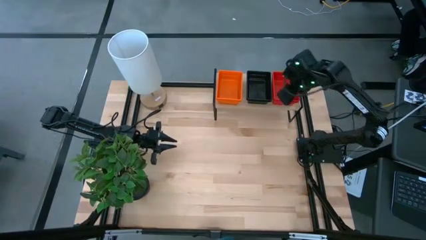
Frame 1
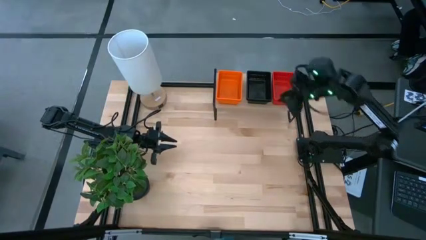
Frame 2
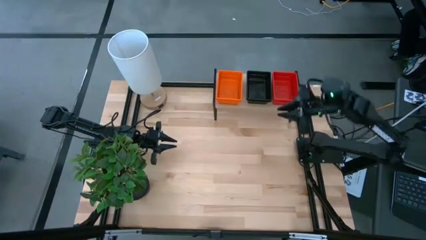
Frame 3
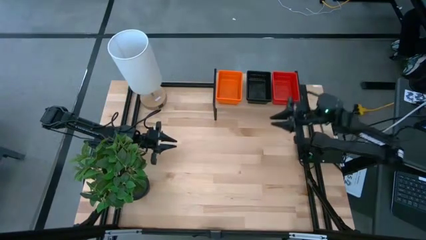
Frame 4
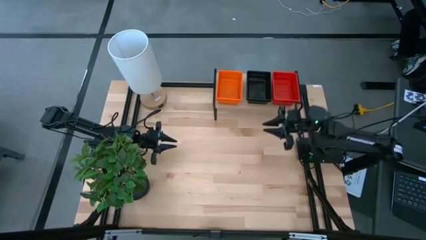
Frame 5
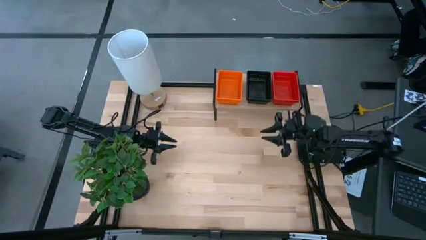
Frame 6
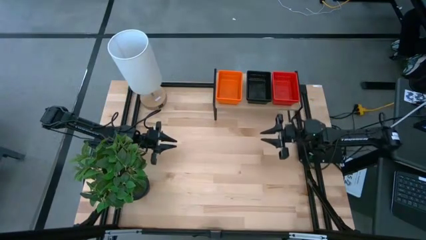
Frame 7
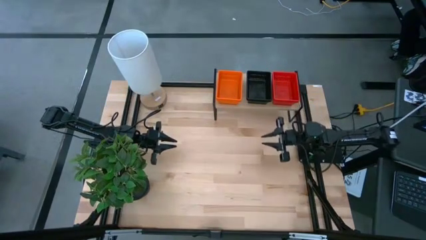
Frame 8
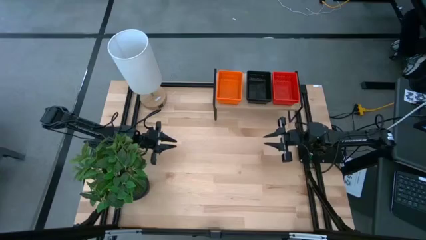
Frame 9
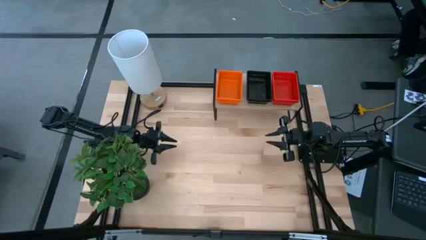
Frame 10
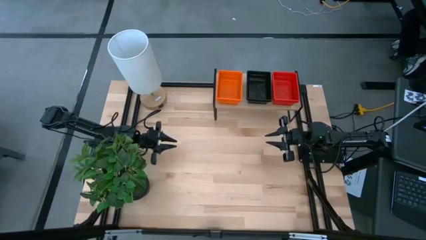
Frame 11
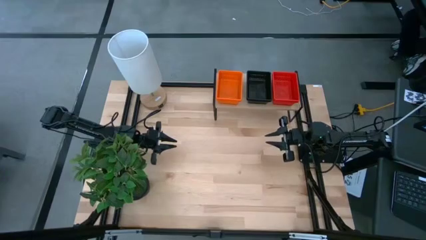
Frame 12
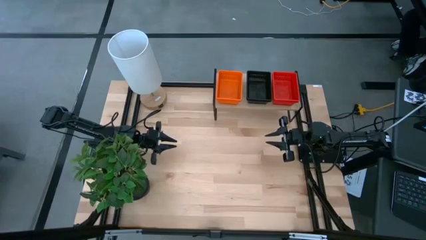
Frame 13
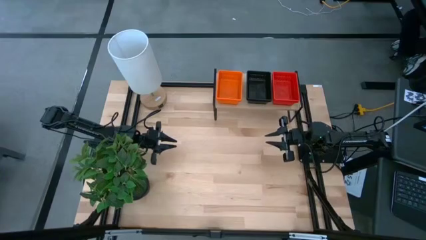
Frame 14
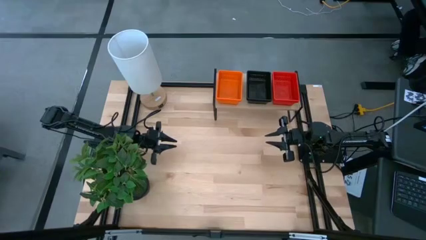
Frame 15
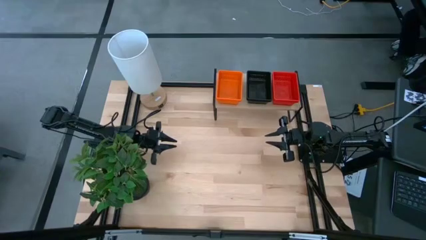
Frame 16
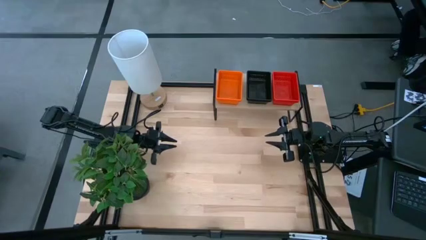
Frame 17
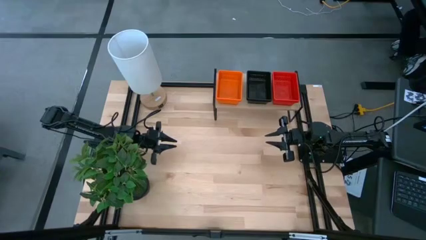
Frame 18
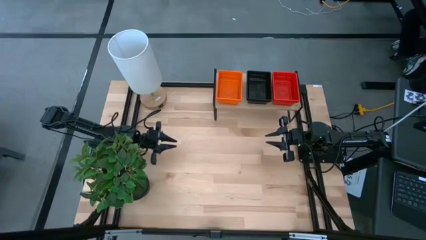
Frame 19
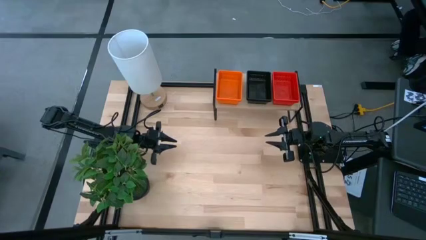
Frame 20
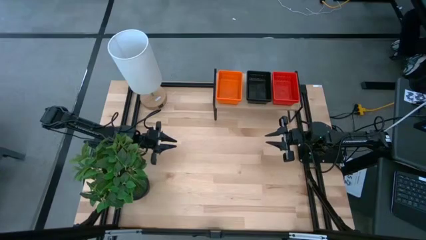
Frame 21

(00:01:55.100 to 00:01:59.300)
Task: Stack baskets on shelf by color
Return to Home Position

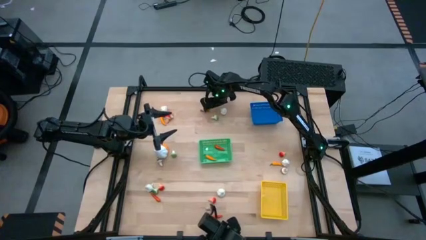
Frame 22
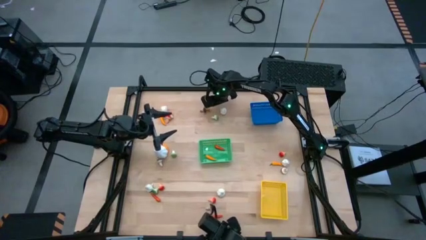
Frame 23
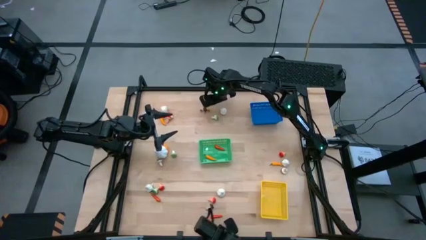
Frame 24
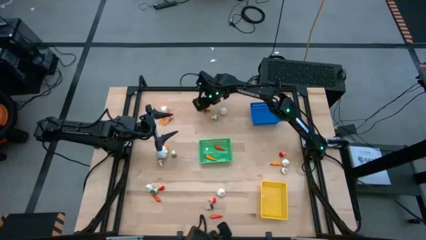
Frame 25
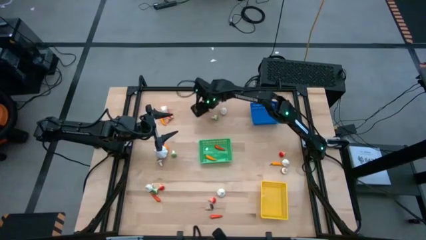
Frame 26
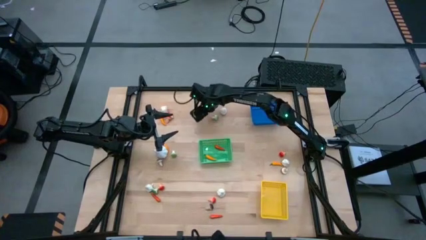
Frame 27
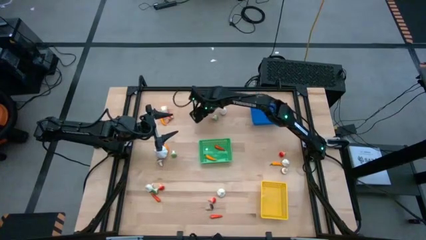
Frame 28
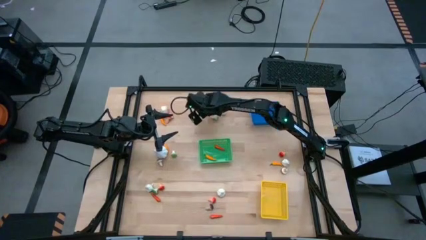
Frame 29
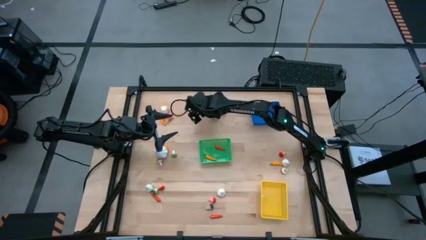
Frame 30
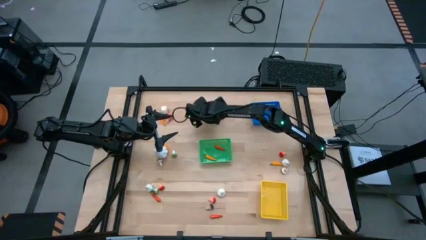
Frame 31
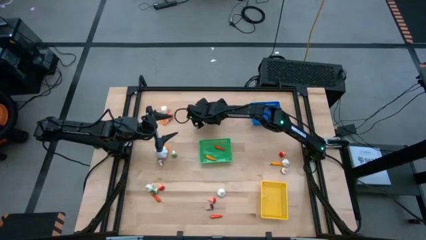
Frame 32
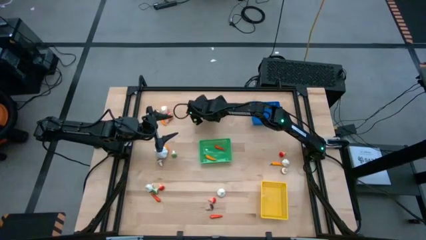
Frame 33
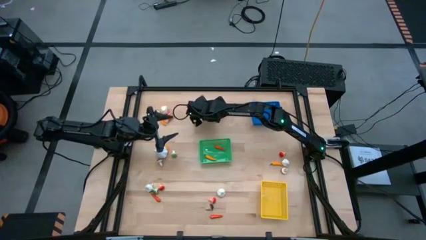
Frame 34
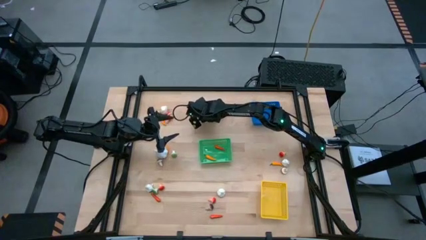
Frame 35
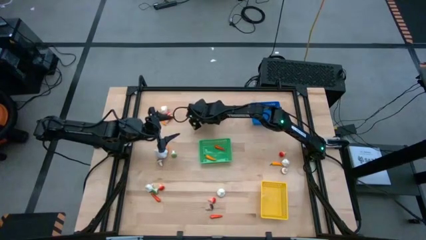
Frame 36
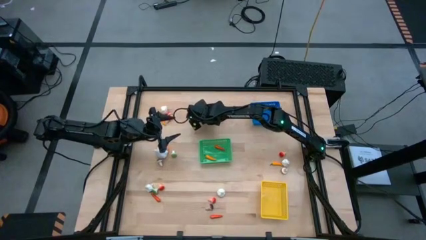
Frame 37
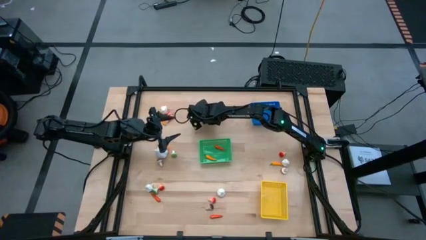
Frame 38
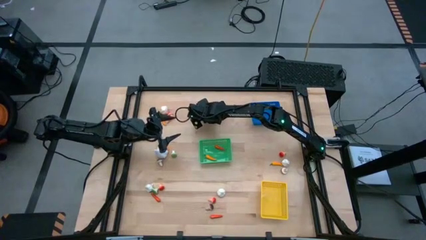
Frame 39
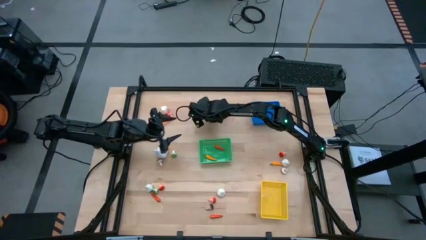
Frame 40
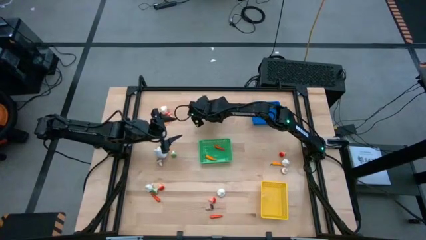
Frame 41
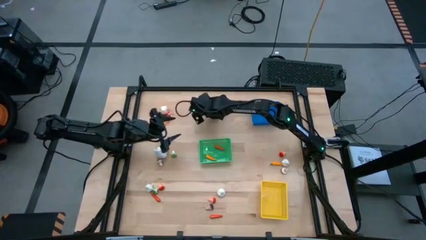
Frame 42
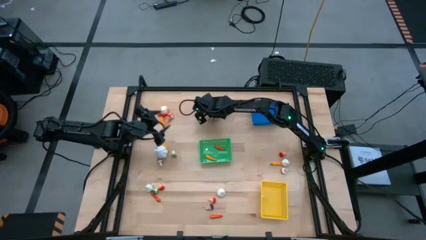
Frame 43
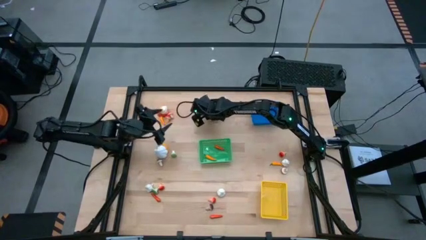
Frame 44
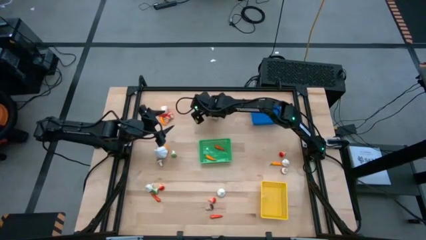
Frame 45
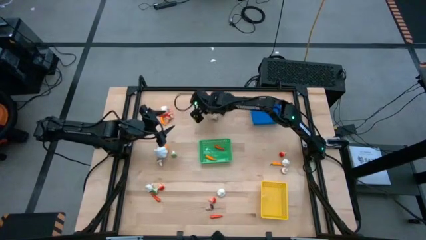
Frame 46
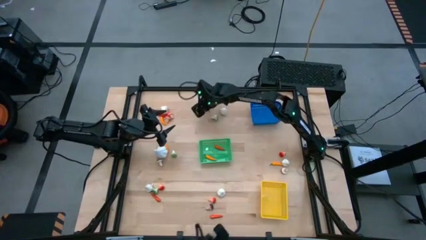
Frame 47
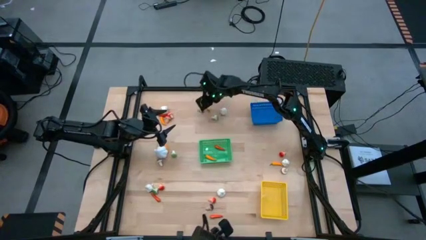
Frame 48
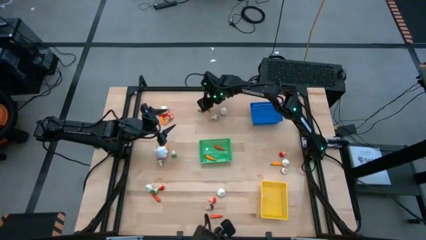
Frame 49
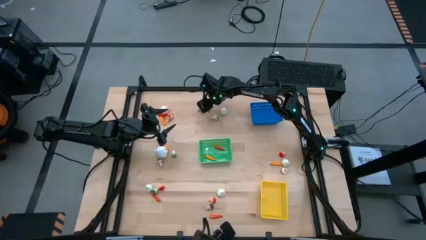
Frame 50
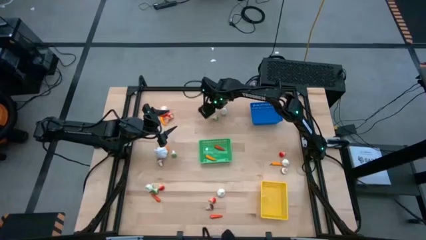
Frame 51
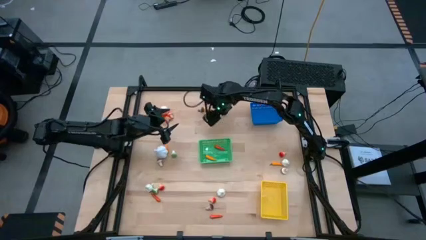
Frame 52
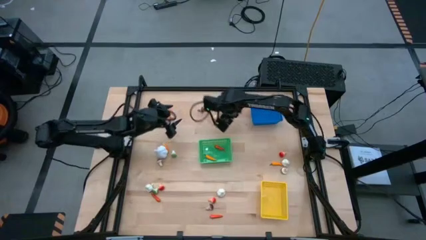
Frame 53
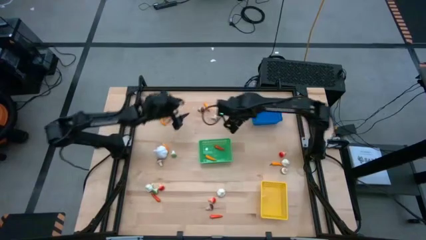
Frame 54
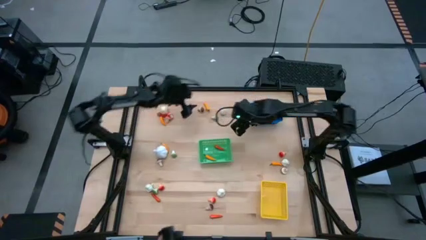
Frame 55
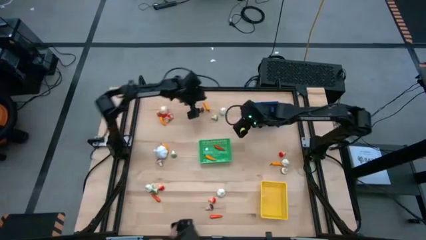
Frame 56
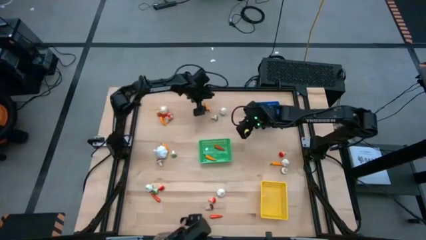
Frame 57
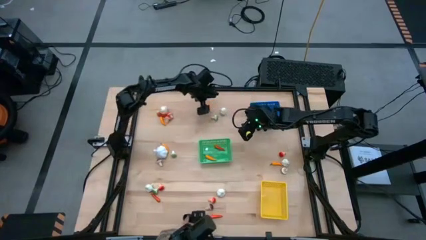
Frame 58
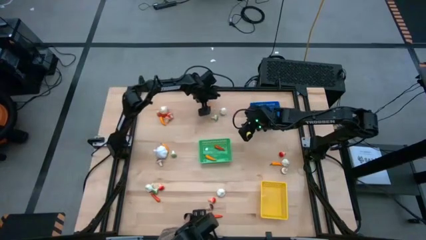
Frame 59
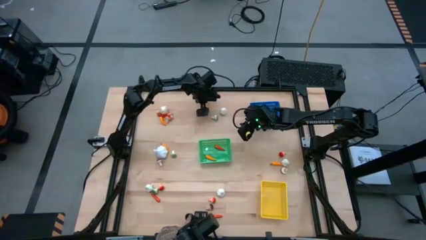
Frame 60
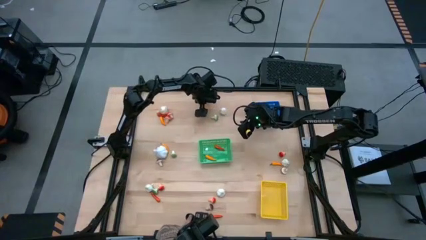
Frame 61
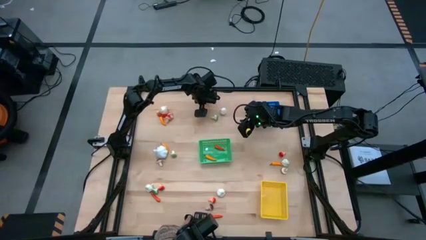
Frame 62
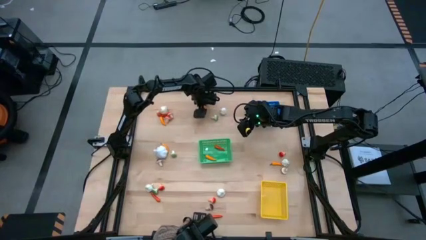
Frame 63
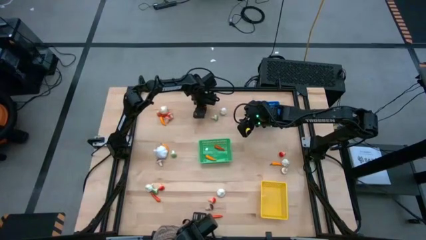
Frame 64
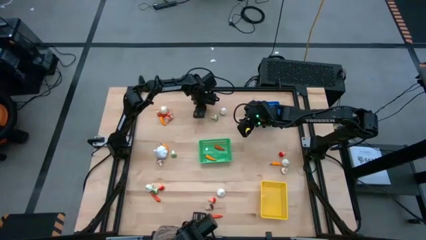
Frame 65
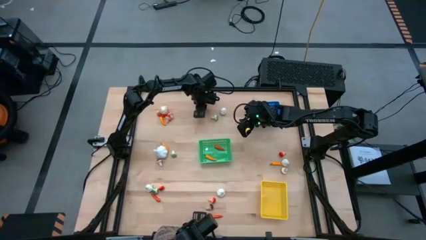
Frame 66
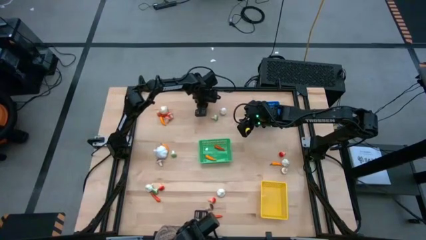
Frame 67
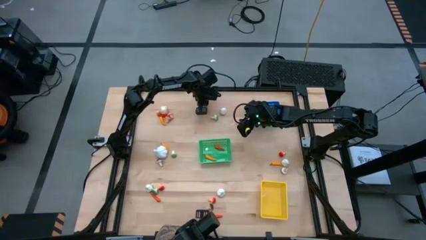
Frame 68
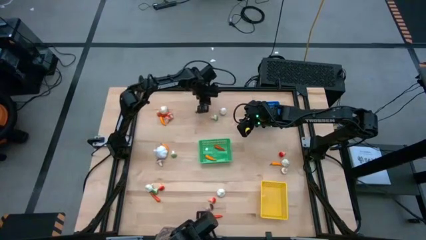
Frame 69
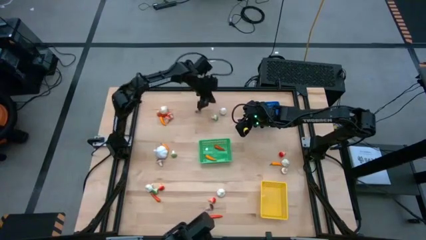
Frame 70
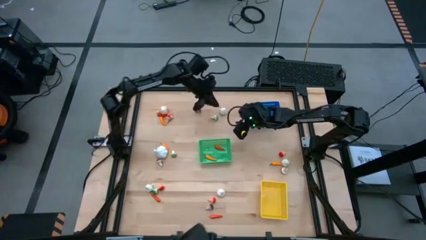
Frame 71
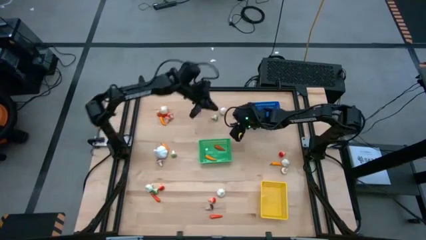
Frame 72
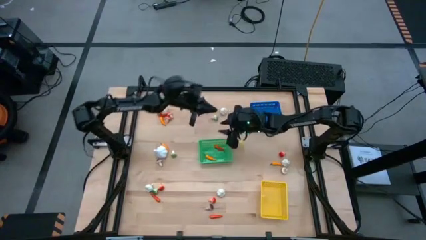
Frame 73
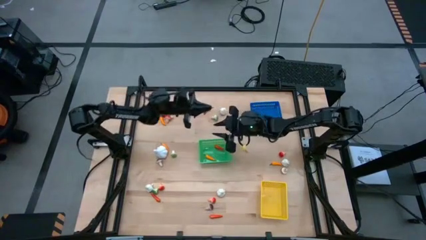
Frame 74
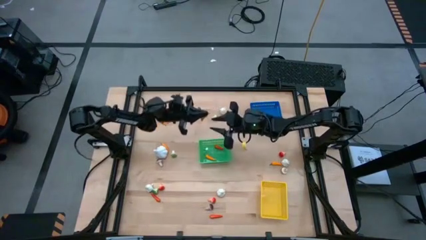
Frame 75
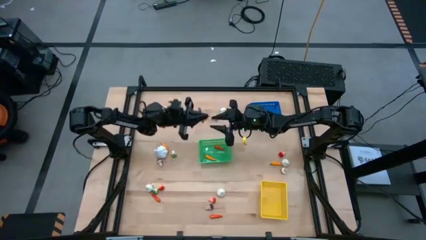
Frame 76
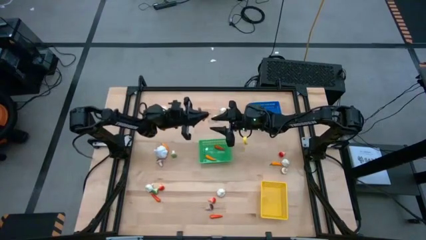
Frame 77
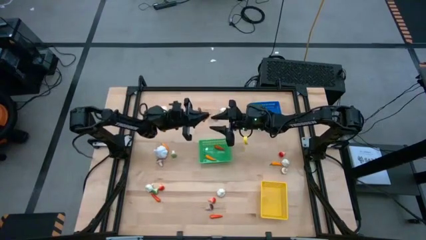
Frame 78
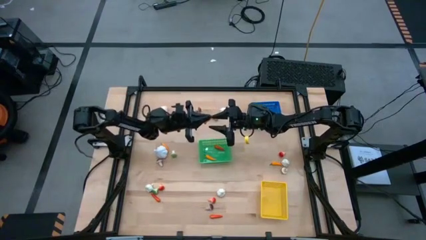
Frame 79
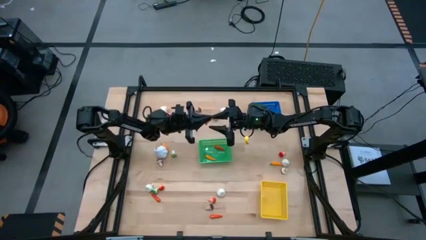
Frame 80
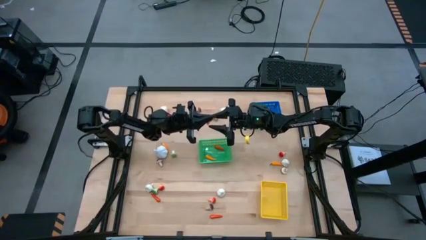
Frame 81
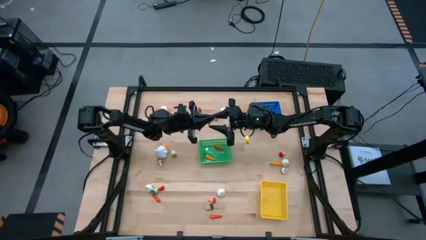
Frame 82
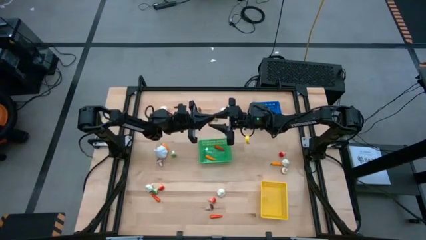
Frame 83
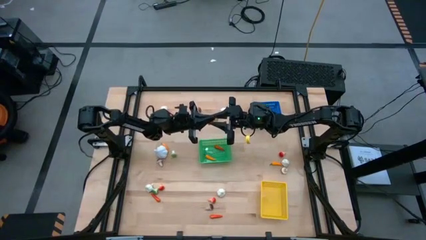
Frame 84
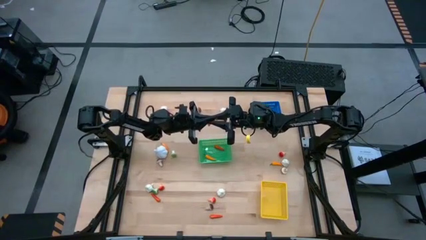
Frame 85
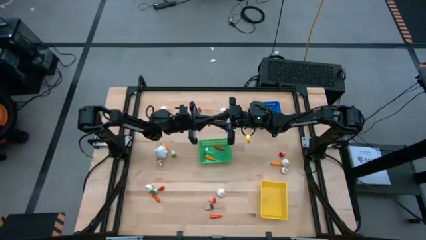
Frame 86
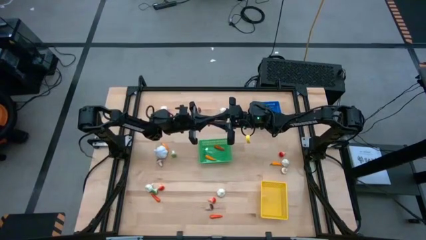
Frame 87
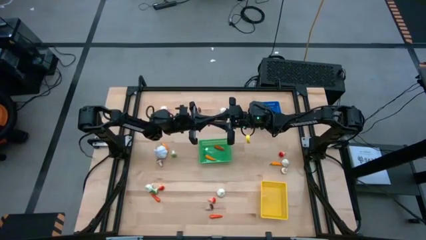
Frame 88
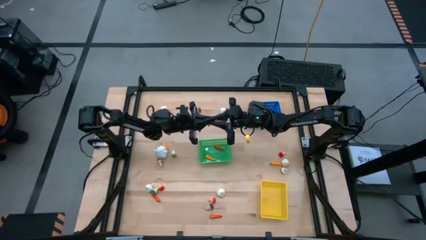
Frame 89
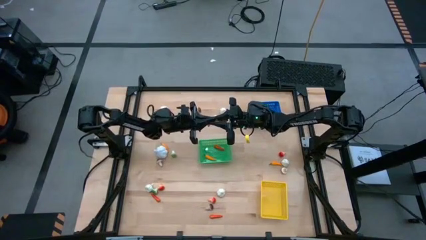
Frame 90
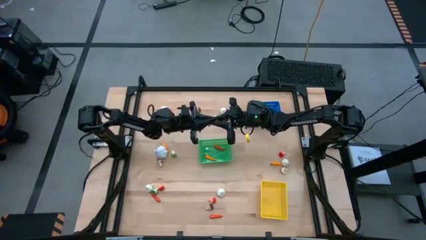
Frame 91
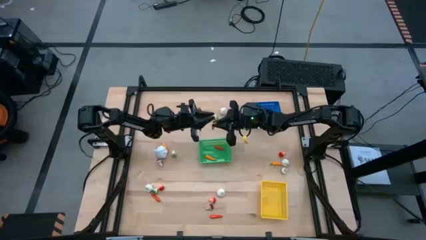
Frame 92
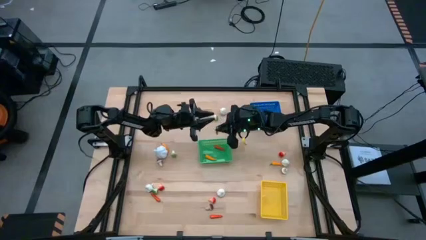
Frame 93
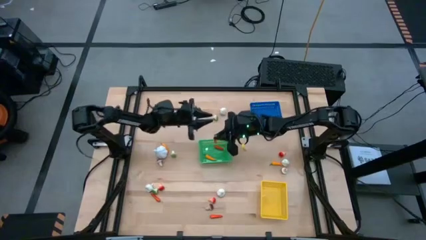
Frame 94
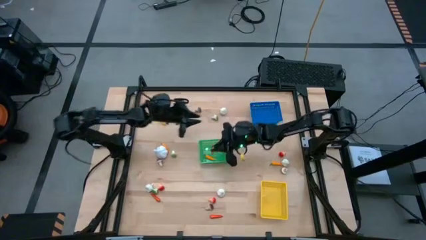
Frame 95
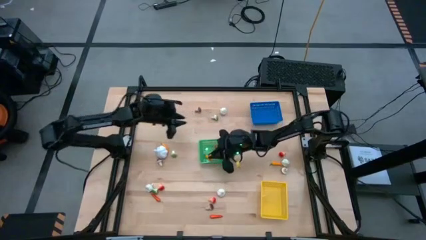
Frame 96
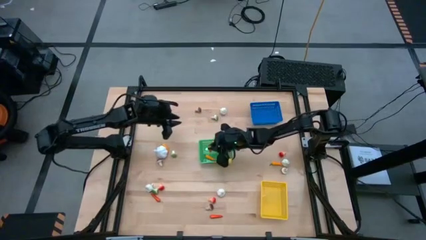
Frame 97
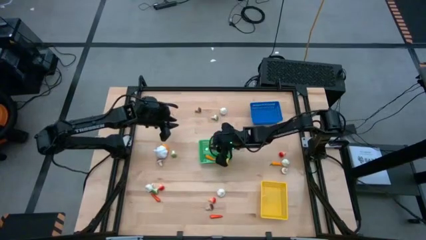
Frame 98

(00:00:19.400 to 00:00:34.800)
Task: Sort produce into baskets
Put the yellow chili pepper into the green bin
